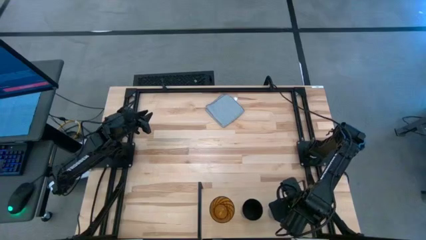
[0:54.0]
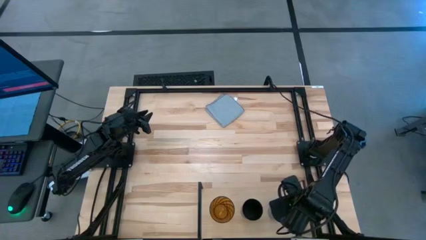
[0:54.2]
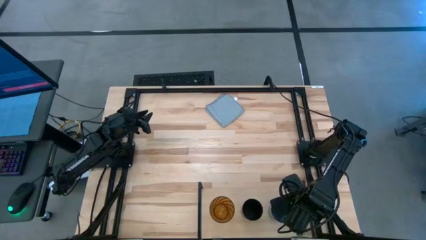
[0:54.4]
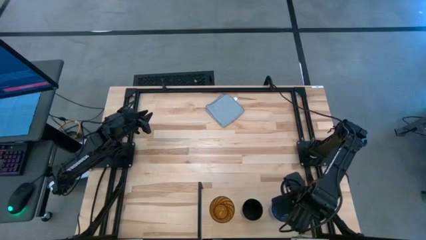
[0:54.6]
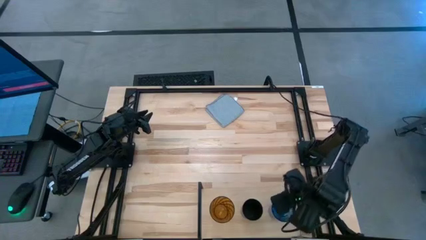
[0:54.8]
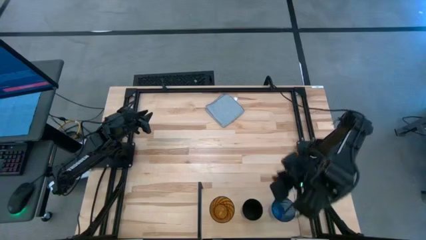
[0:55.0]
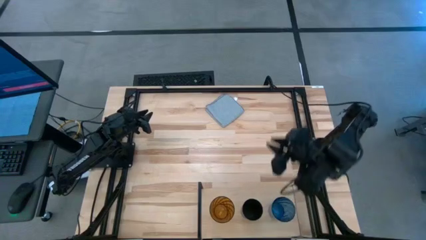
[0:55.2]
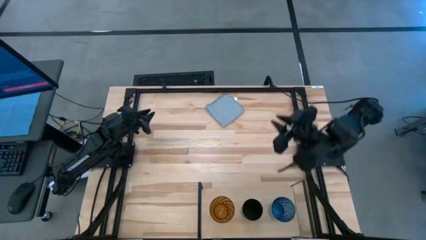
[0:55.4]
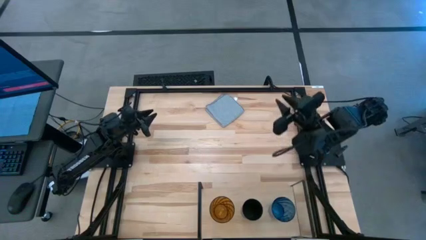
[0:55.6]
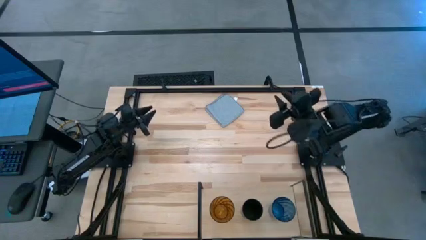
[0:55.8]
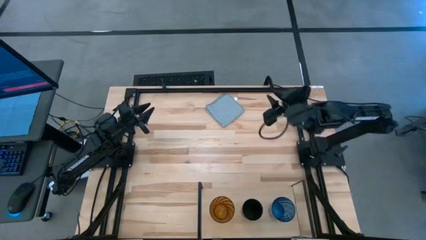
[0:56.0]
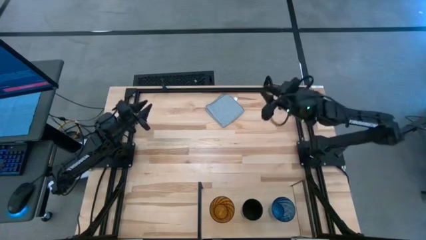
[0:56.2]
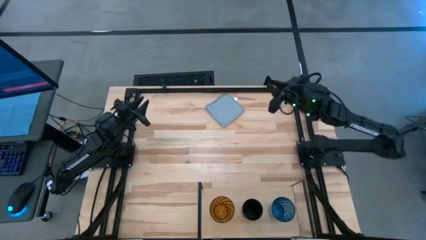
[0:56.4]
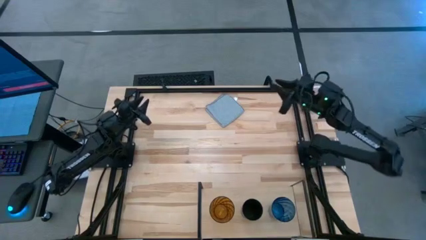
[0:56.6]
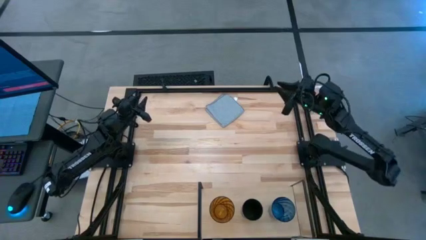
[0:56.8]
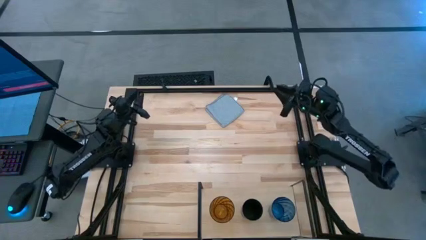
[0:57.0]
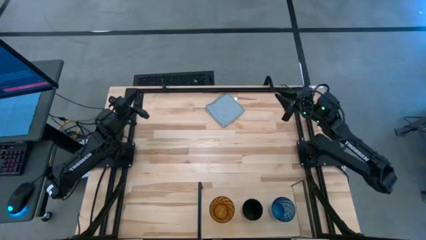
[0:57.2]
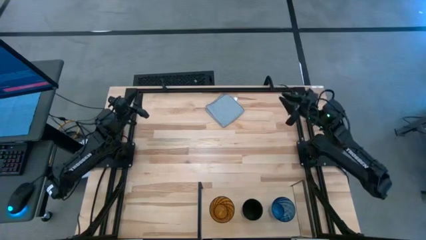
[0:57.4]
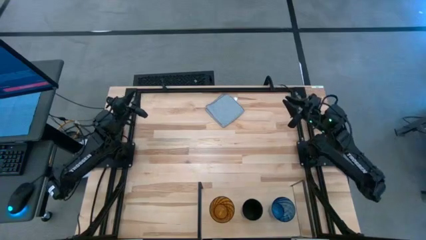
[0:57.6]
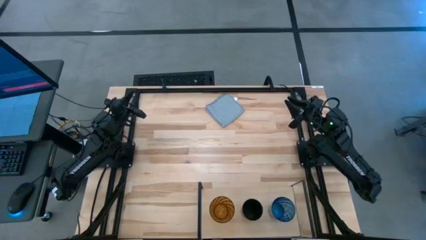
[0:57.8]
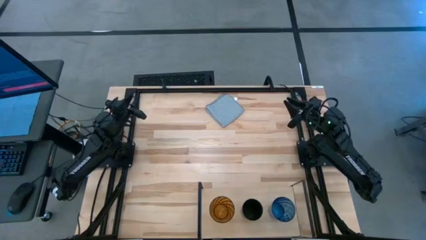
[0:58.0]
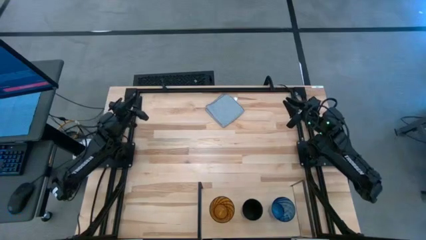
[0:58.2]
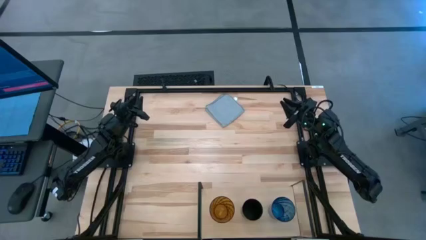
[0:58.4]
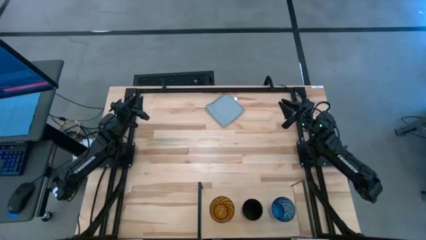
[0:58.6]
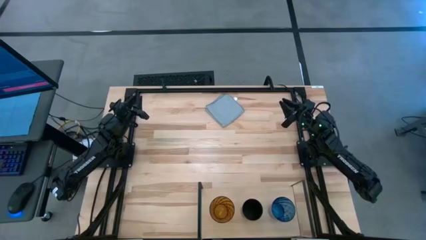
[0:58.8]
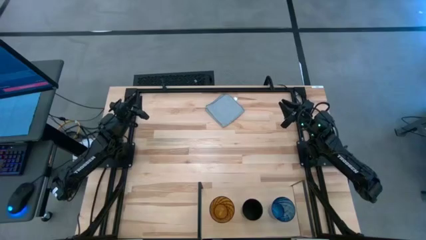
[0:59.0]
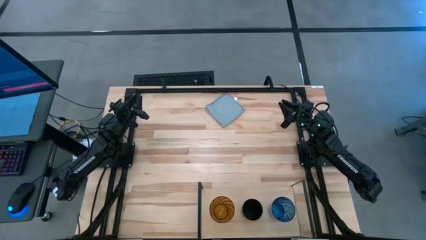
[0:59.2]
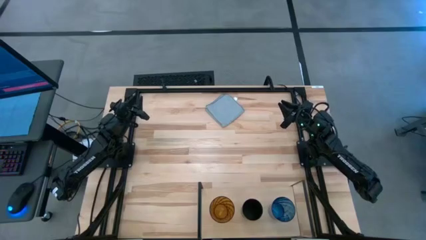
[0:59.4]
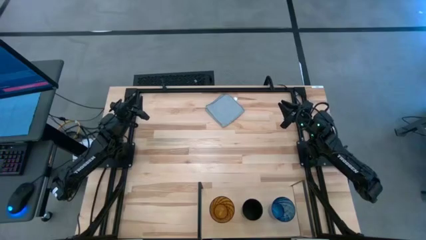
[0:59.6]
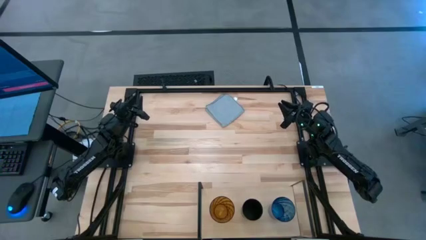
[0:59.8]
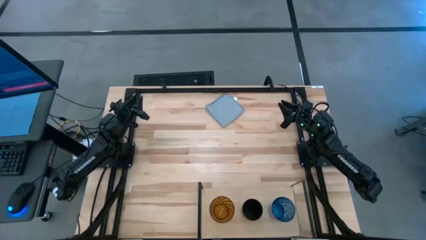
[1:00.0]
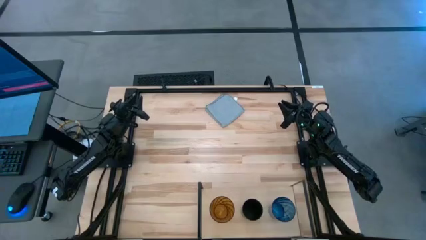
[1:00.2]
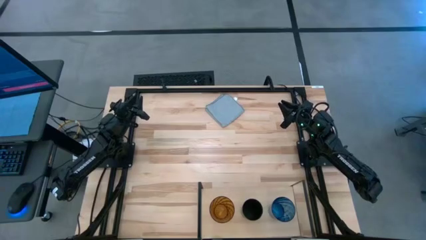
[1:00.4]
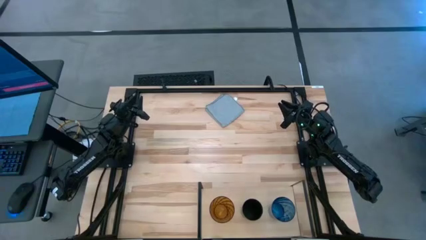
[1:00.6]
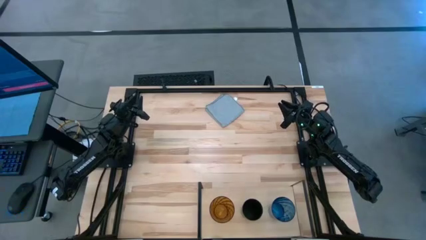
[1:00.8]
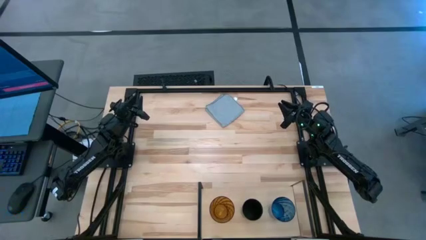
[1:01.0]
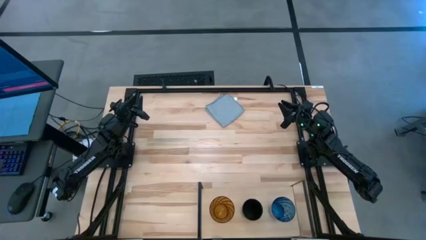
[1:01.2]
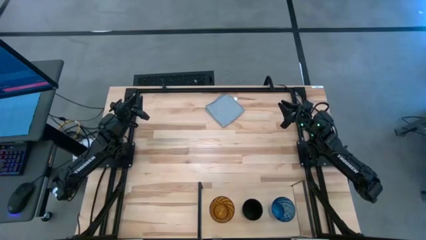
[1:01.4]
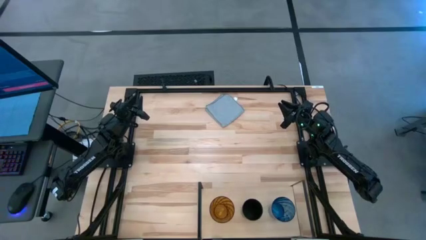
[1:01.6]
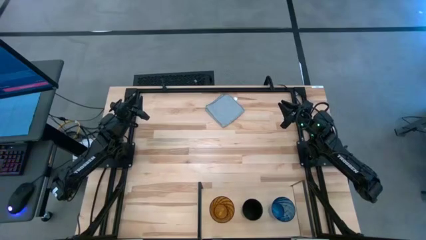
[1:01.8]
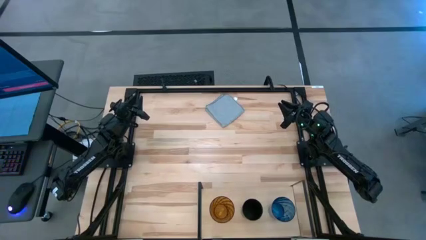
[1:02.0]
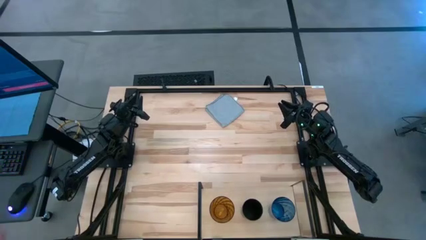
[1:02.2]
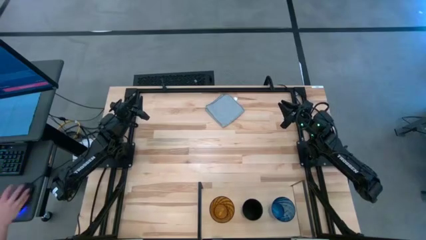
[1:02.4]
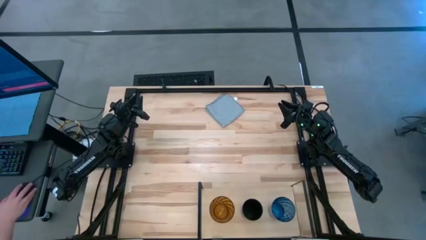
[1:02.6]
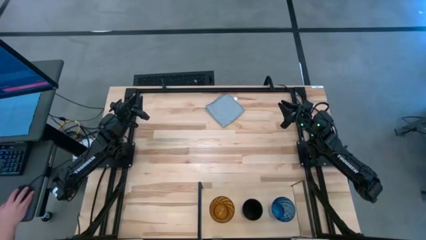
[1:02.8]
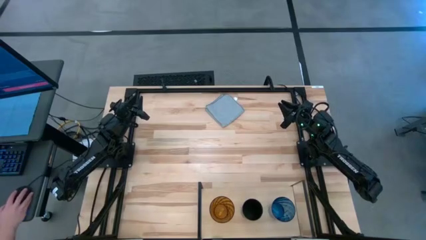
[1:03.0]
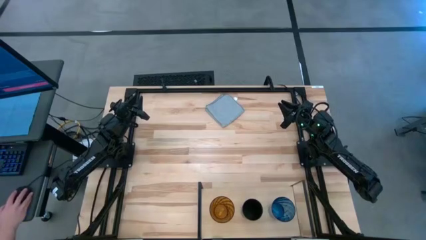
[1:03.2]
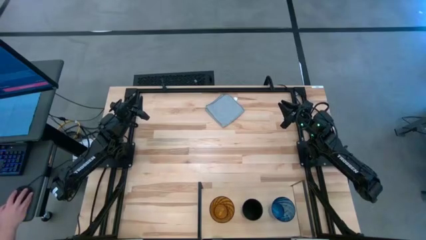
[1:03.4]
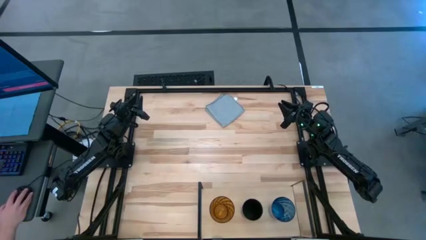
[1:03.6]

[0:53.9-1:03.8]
Task: Stack small to large cups/mugs on shelf
Return to Home Position

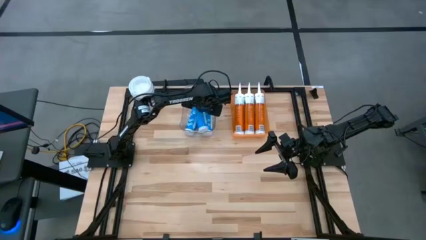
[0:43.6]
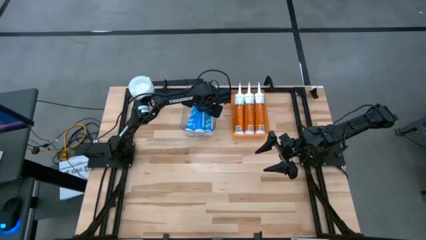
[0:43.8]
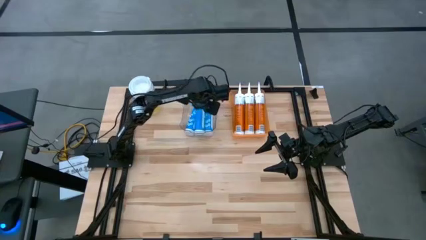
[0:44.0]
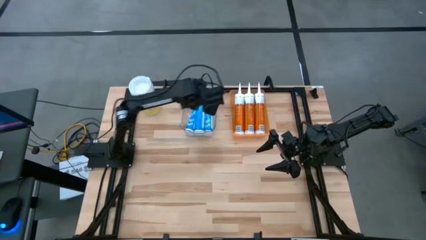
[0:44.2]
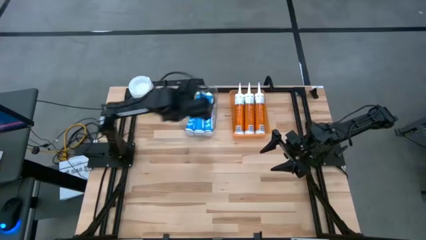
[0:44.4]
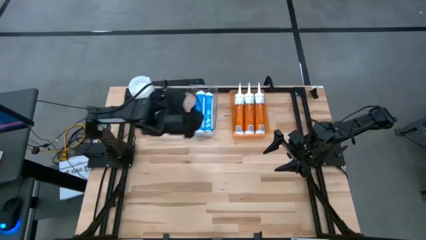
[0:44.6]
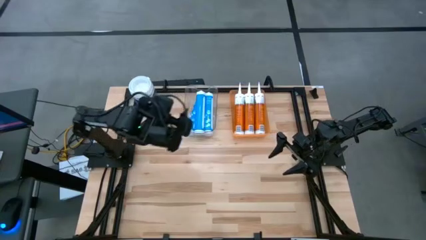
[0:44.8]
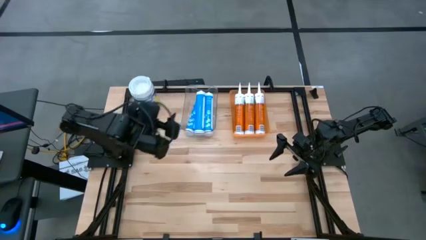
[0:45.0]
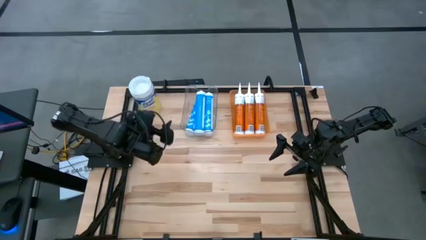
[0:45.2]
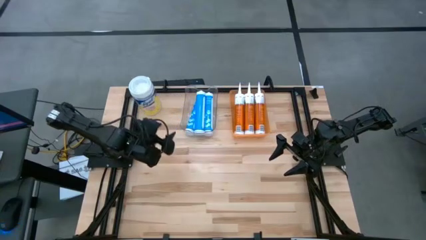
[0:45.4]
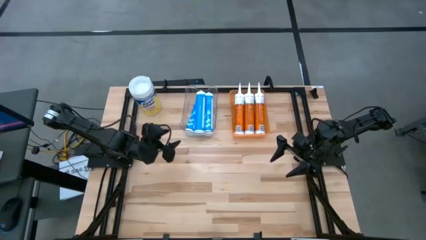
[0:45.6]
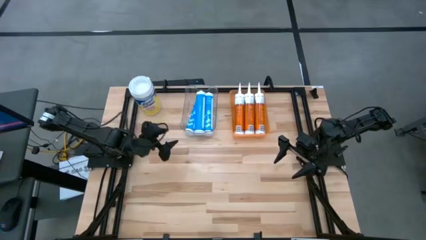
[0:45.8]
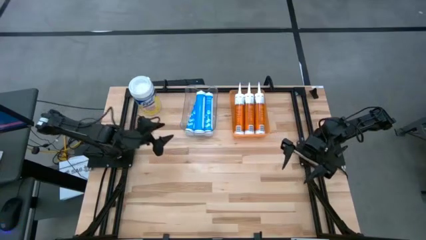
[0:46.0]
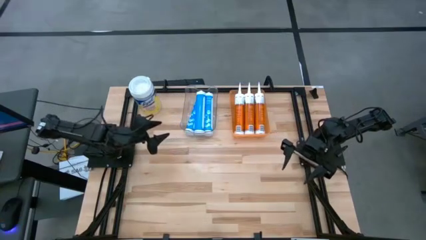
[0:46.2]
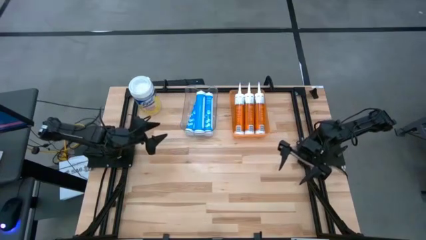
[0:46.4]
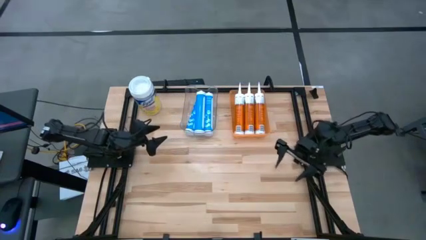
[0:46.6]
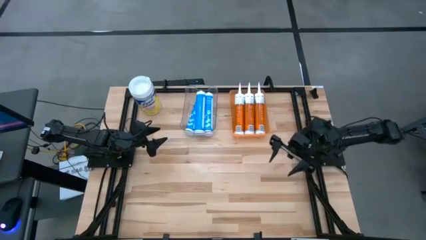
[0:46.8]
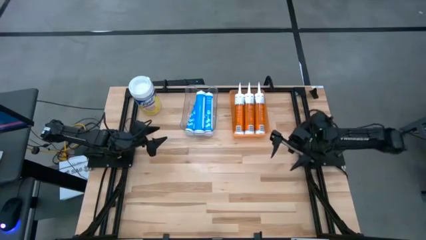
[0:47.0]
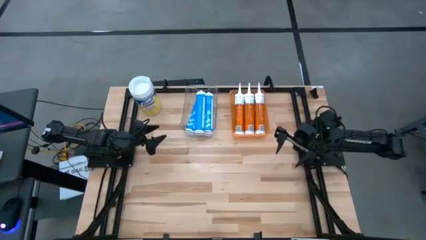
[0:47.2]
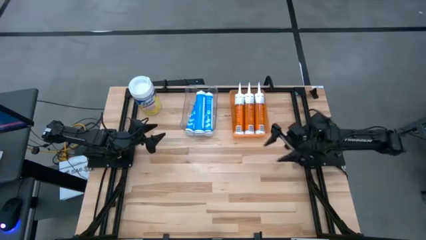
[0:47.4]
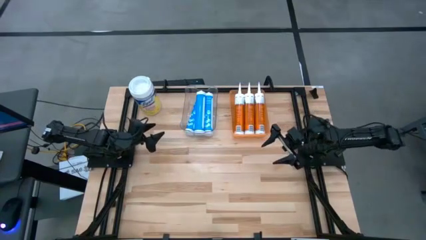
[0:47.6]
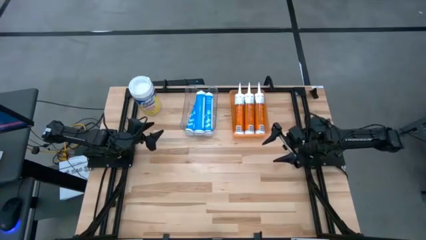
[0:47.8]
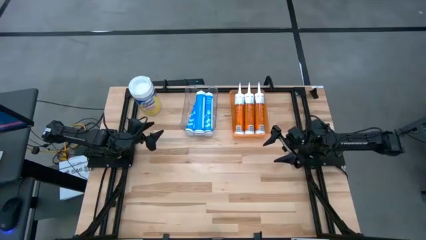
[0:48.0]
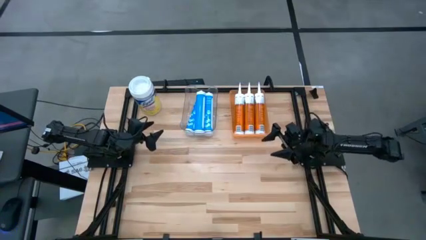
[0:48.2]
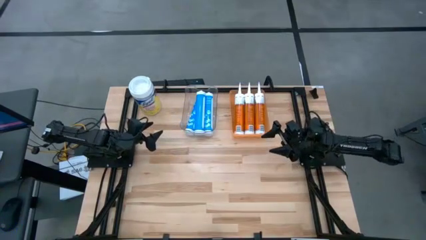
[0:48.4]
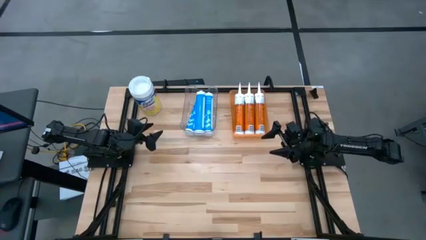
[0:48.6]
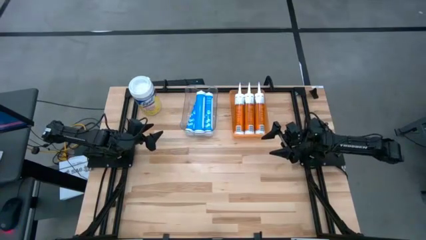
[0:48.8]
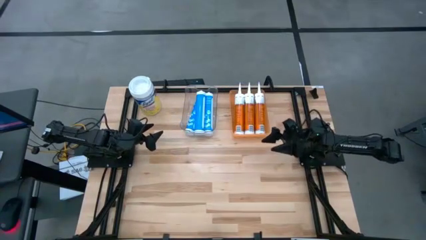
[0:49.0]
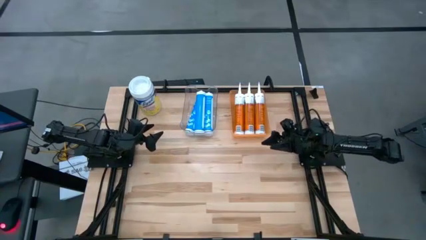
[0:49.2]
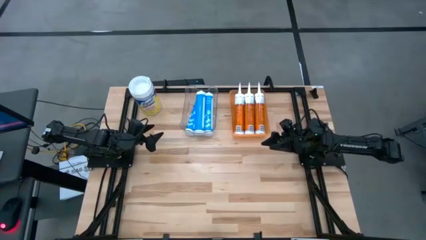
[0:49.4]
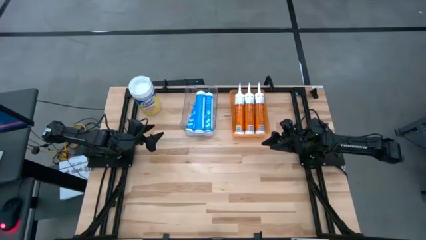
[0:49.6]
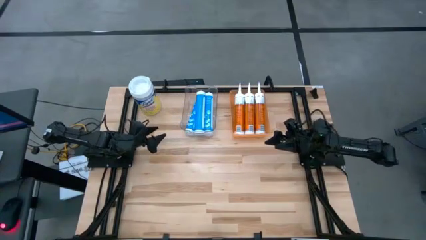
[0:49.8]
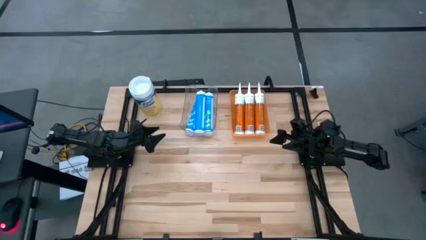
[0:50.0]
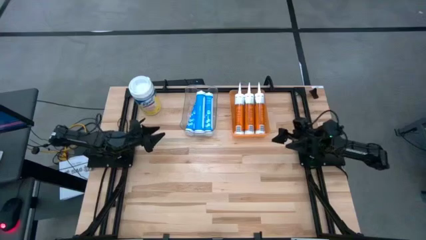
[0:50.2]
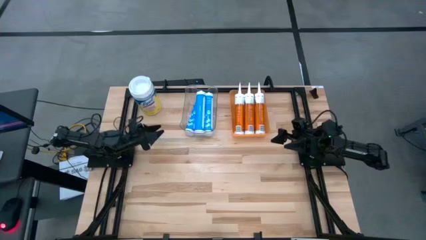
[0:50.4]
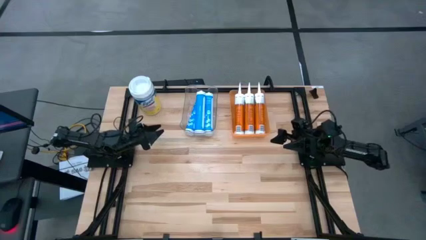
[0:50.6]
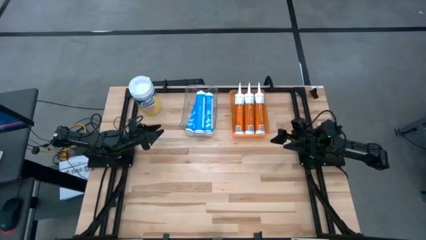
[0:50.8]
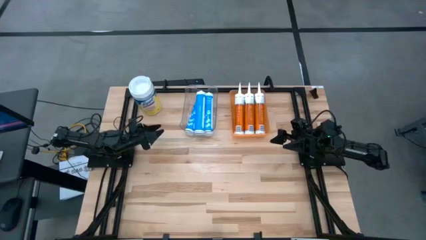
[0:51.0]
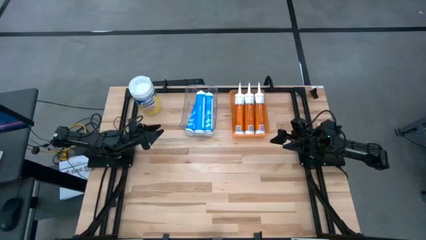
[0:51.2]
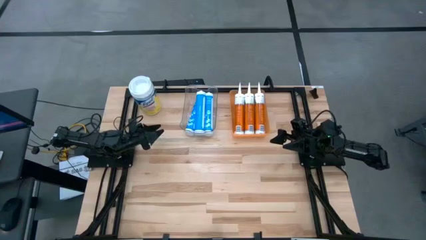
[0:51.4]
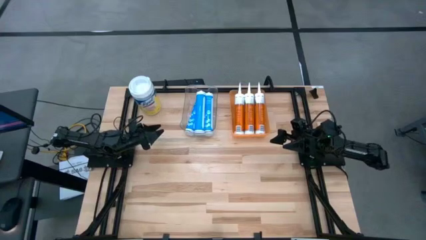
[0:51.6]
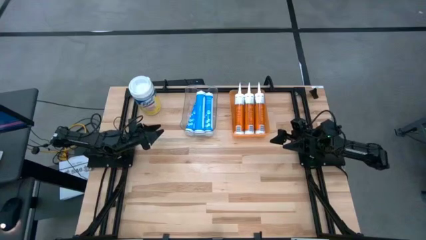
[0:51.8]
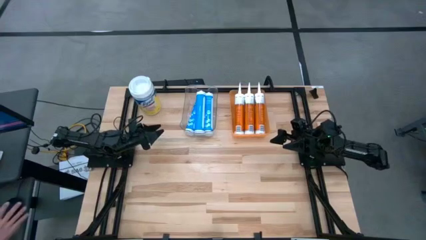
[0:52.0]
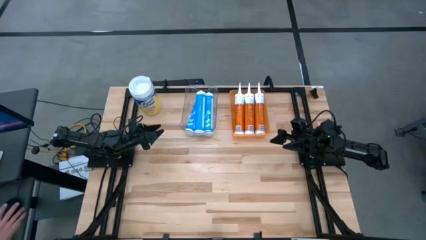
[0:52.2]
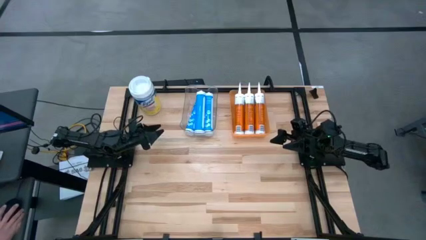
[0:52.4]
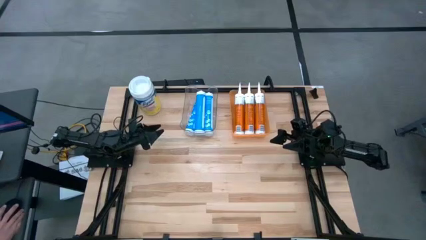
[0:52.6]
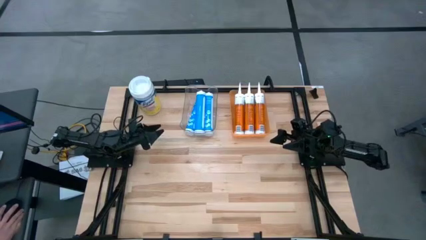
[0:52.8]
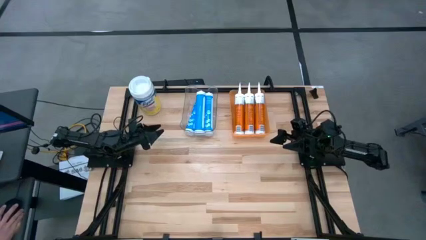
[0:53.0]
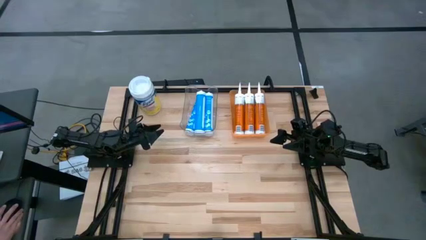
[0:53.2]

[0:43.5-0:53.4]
Task: Pick & place silicon tubes, Sealant and Lysol wipes
Return to Home Position
